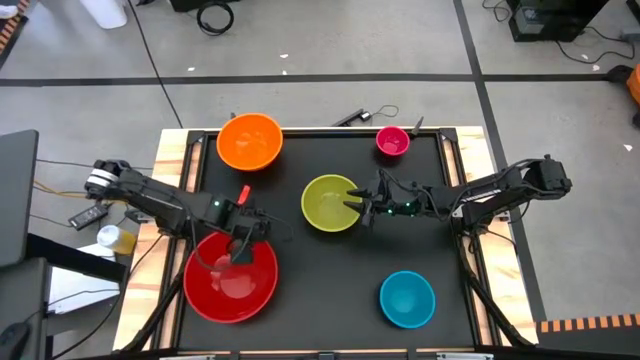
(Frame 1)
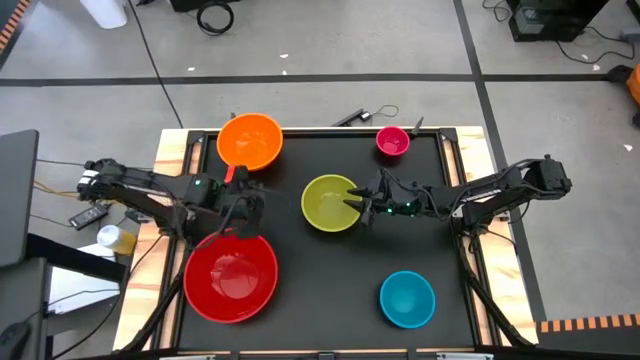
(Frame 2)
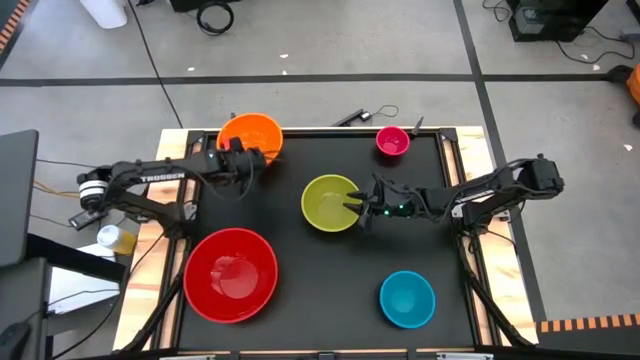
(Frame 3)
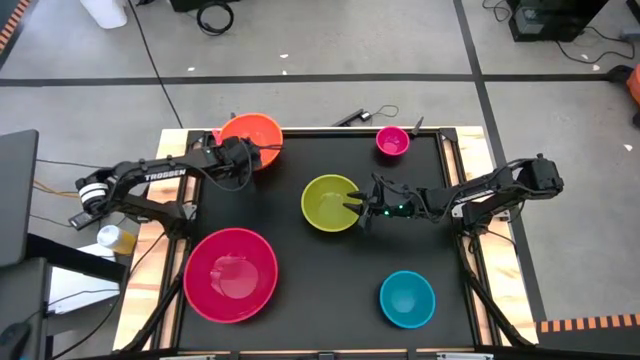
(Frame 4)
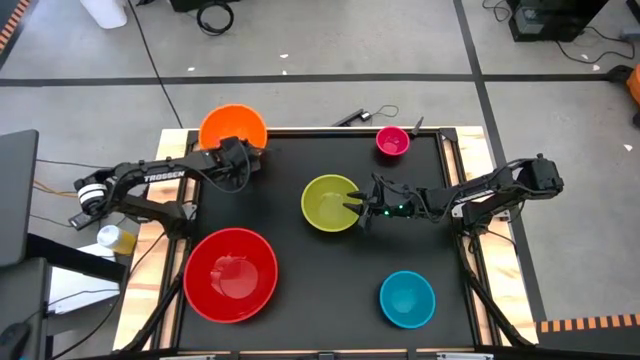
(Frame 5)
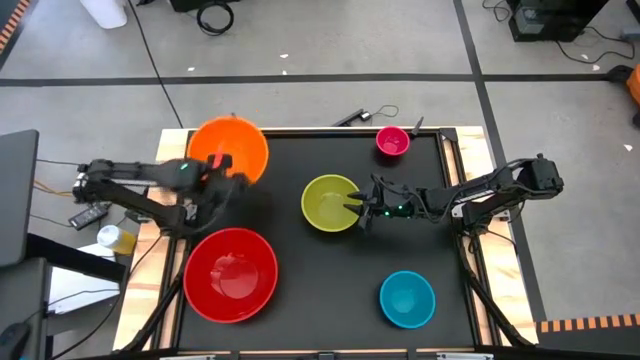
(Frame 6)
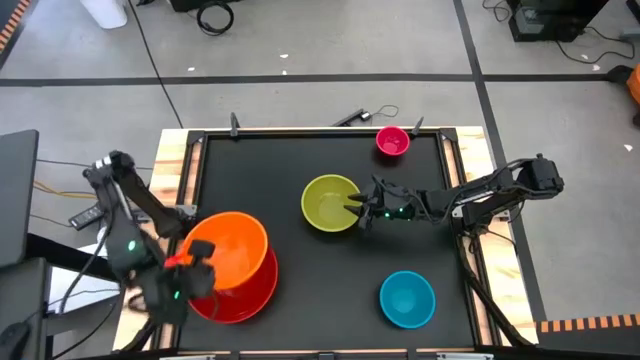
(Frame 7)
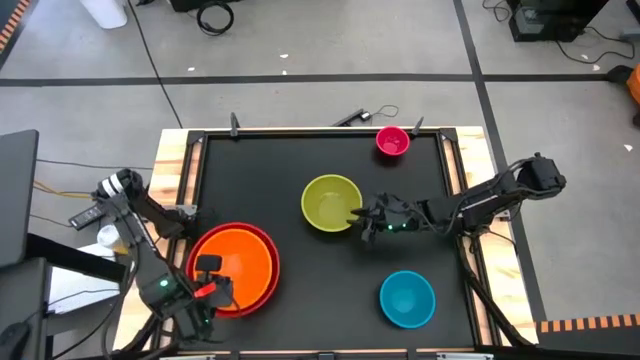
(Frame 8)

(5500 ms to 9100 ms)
Stack the orange bowl on the top of the red bowl

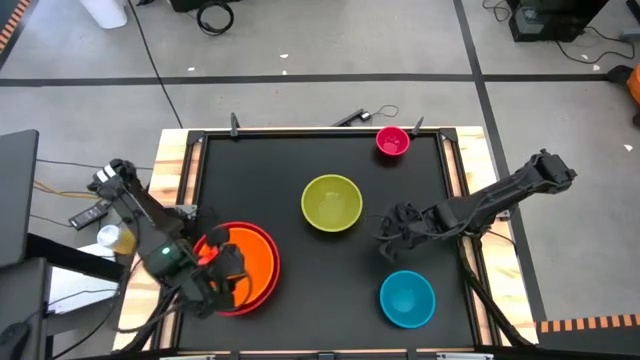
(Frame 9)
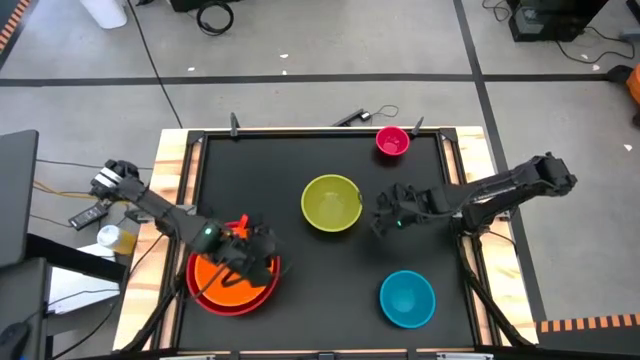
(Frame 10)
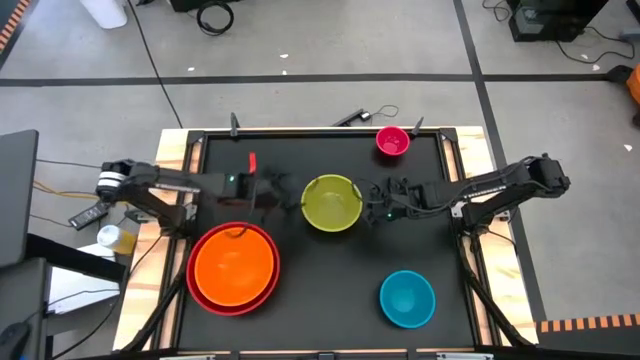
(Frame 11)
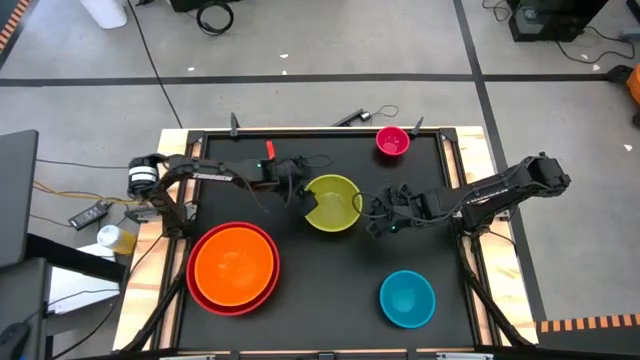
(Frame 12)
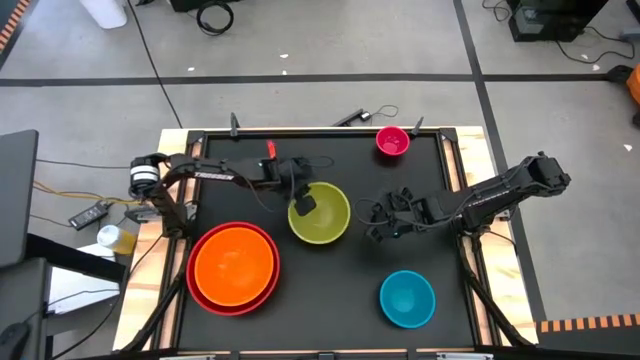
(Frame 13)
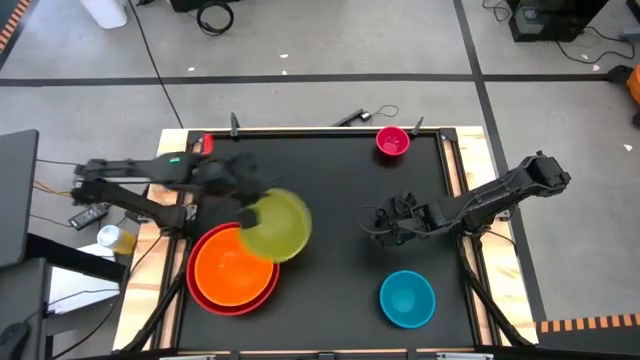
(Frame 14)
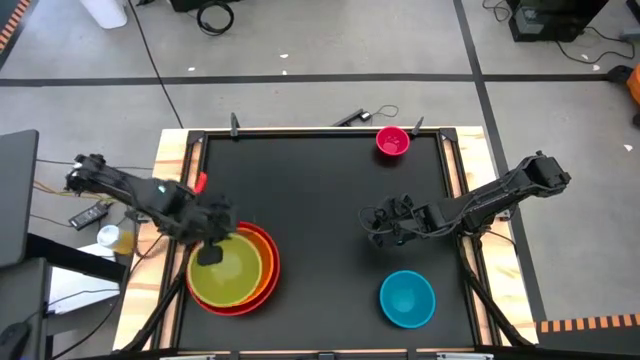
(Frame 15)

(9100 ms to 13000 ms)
Stack the green bowl on top of the orange bowl

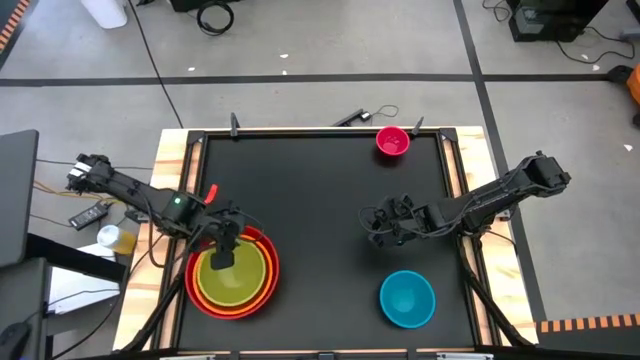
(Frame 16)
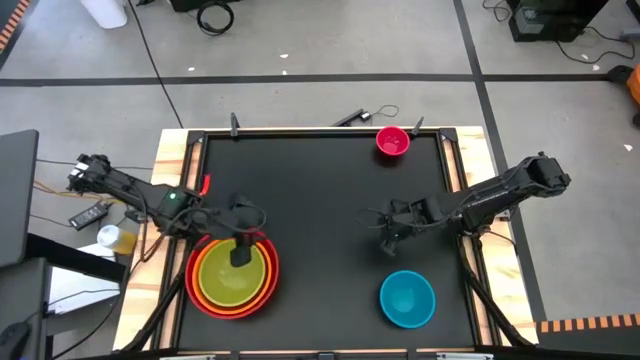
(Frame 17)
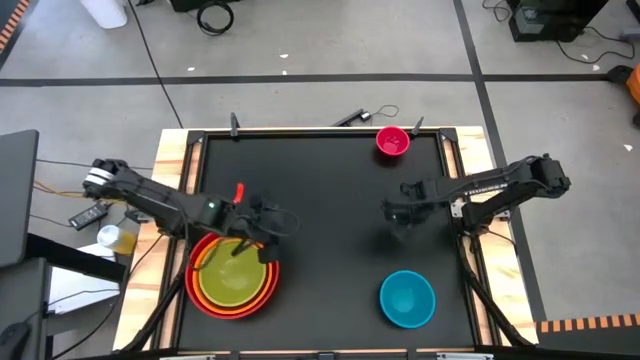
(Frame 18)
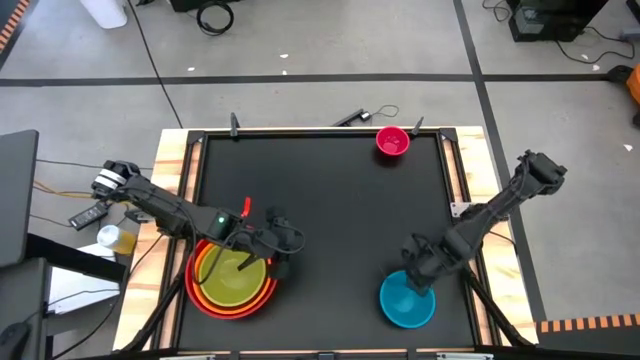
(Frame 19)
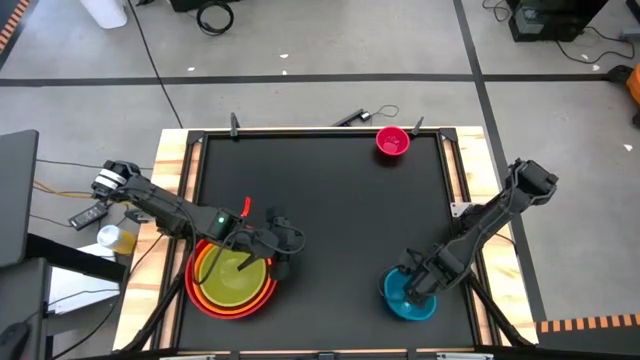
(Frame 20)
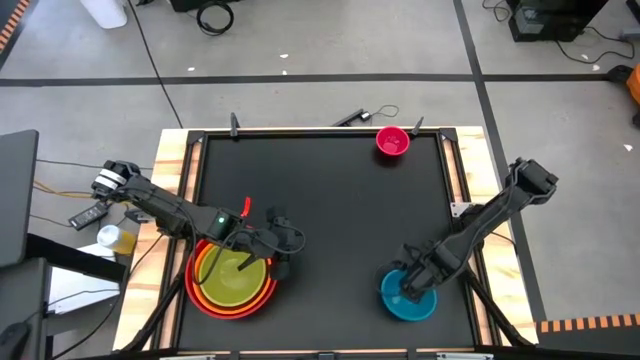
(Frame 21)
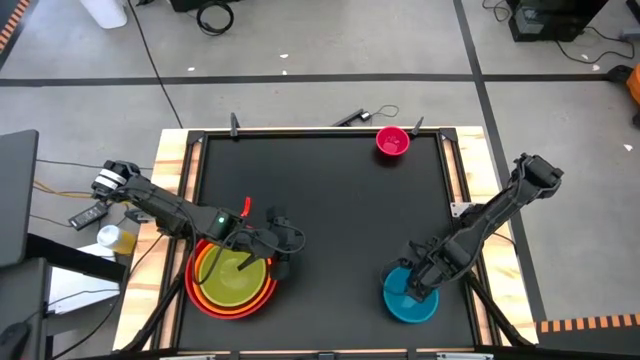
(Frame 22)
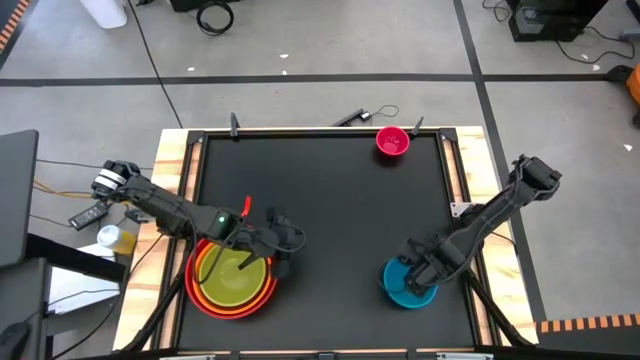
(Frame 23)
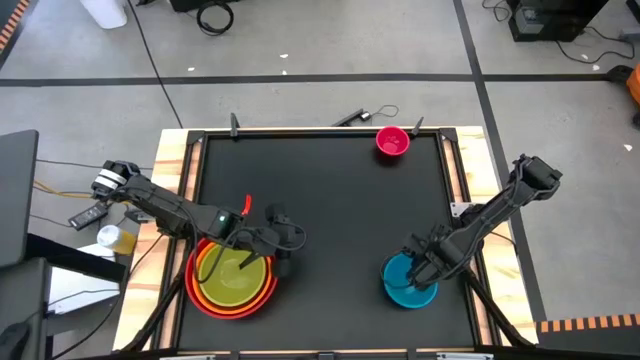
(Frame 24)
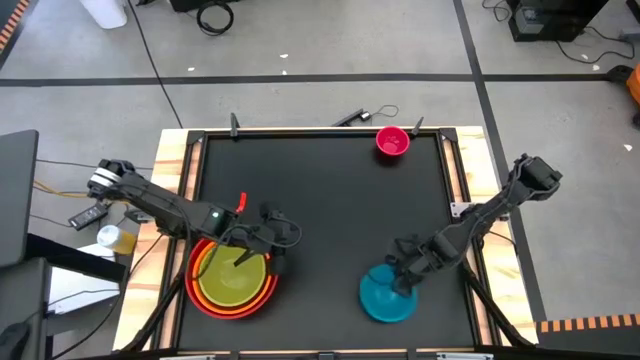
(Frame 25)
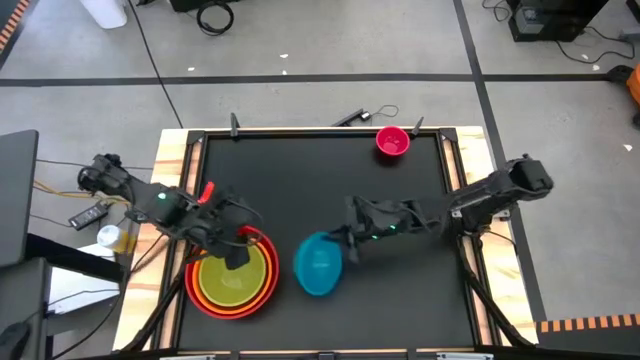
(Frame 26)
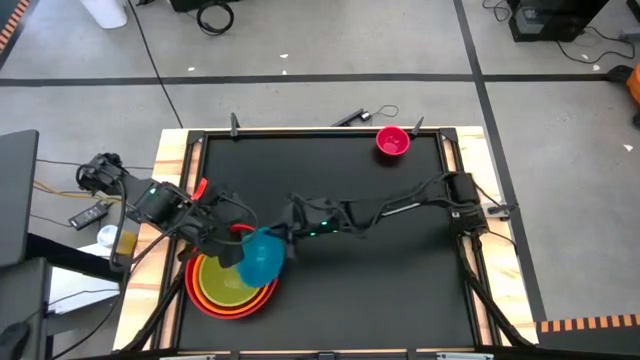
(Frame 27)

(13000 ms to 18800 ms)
Stack the blue bowl on top of the green bowl

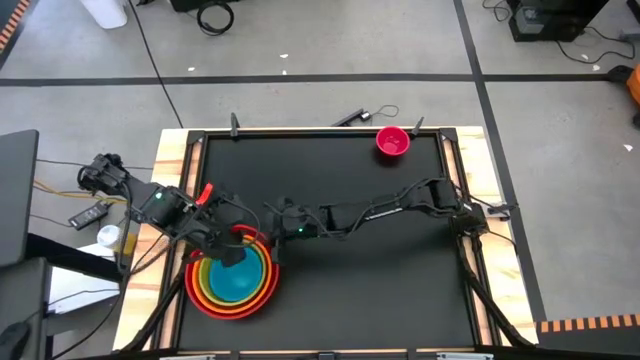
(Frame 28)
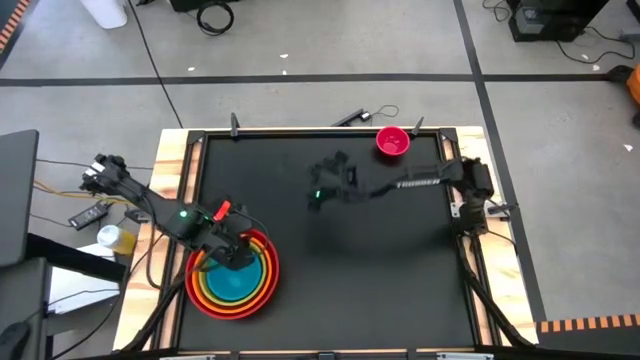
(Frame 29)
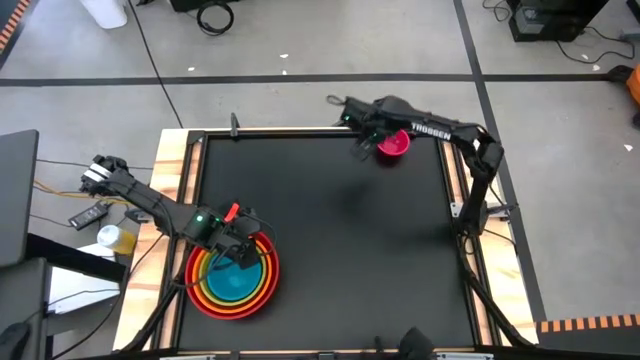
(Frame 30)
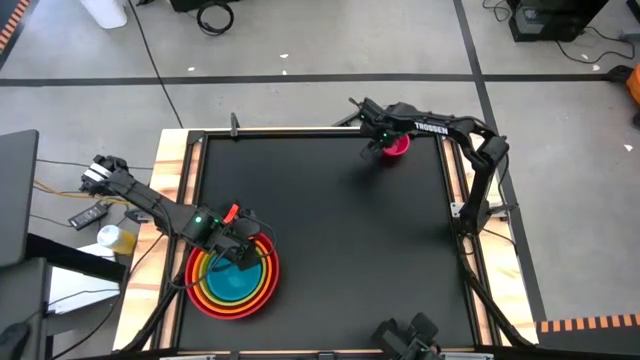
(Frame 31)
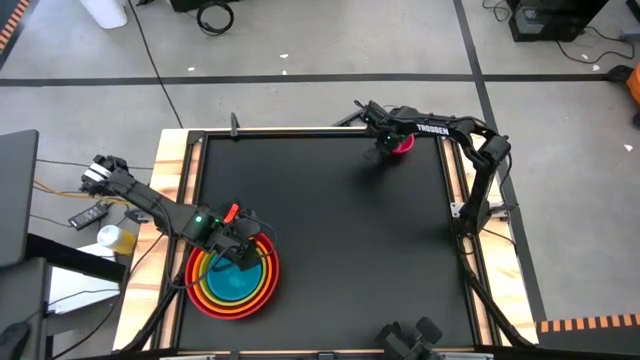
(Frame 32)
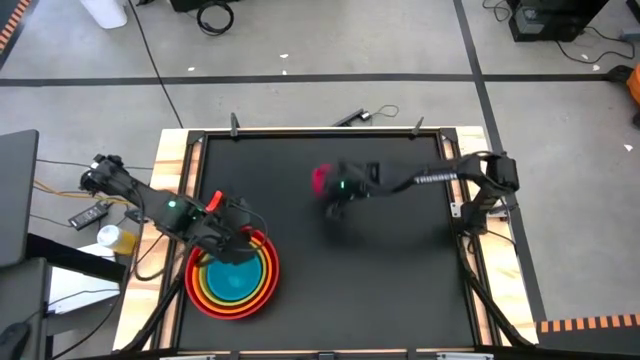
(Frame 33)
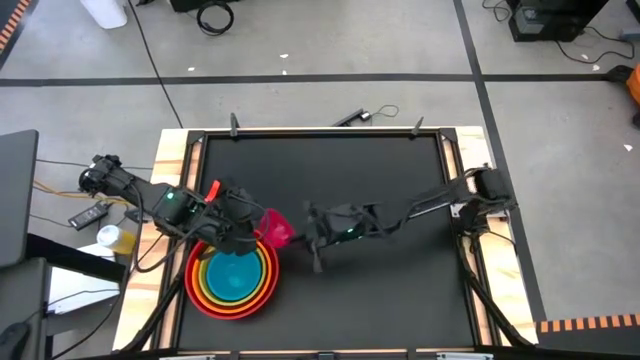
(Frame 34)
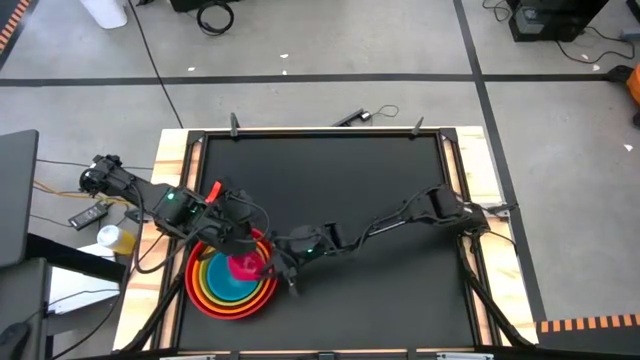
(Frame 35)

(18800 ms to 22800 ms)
Stack the pink bowl on top of the blue bowl
